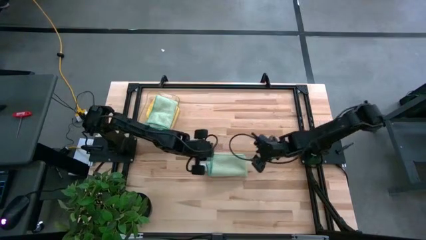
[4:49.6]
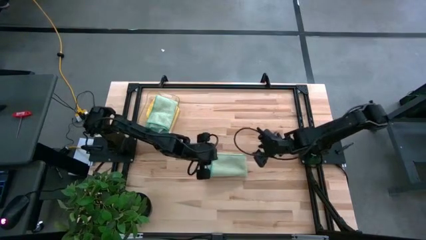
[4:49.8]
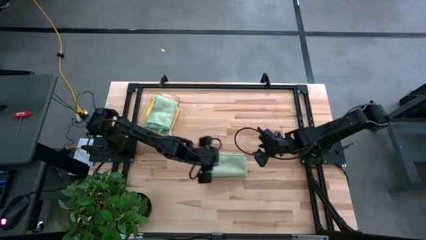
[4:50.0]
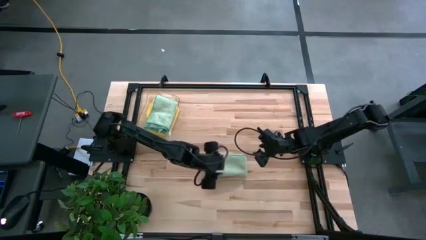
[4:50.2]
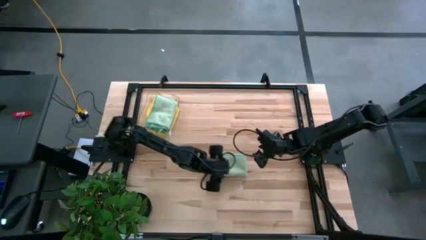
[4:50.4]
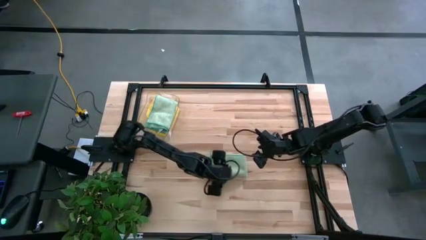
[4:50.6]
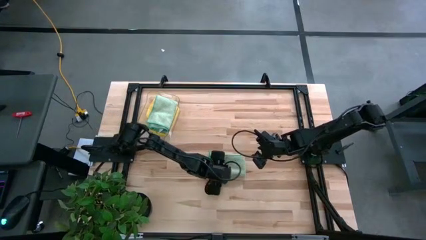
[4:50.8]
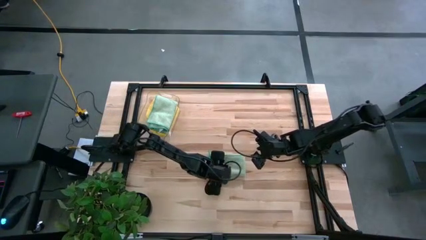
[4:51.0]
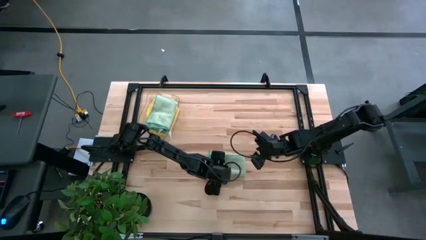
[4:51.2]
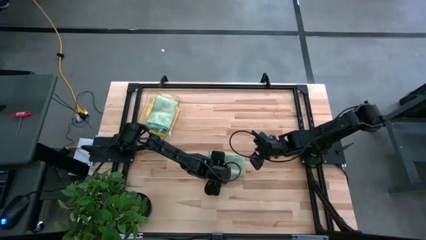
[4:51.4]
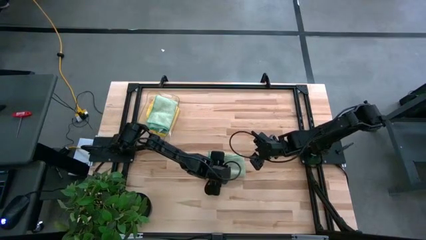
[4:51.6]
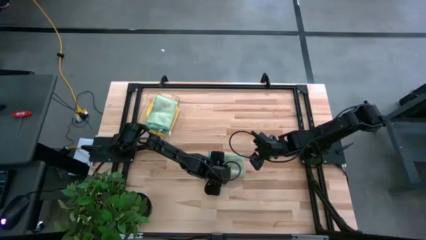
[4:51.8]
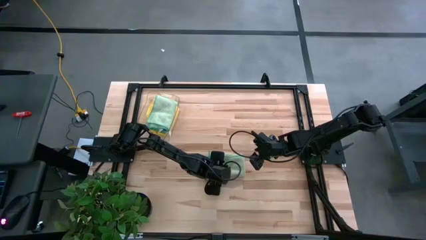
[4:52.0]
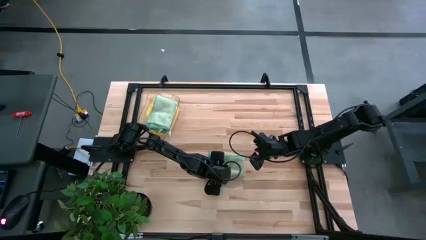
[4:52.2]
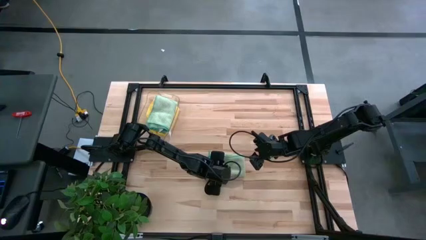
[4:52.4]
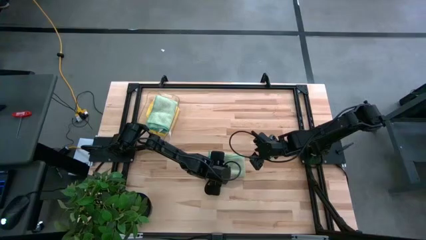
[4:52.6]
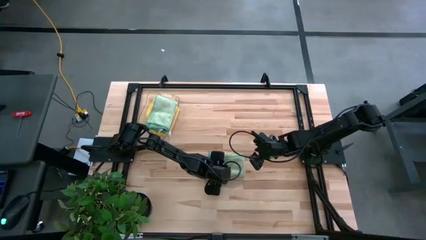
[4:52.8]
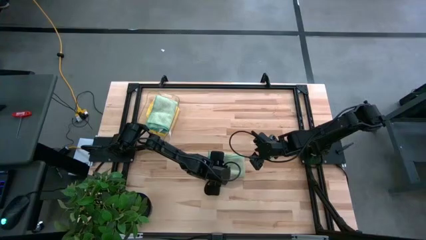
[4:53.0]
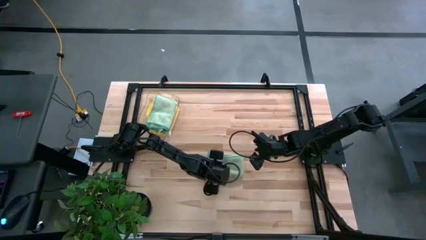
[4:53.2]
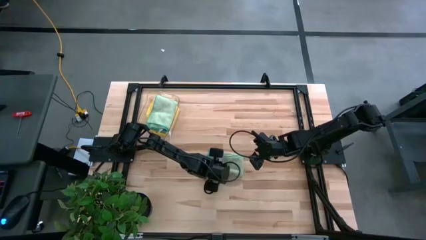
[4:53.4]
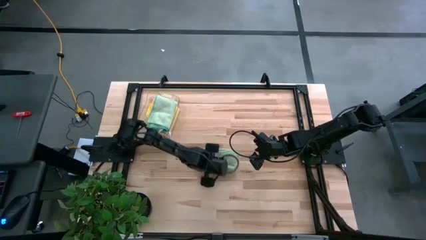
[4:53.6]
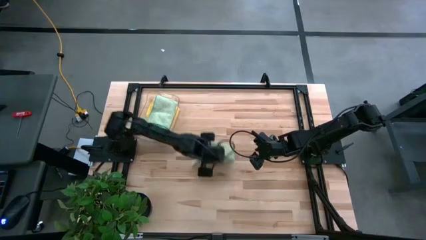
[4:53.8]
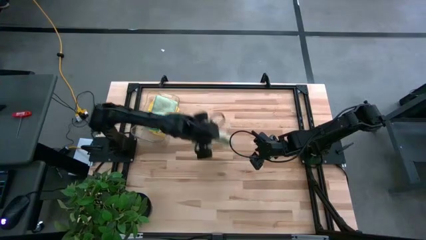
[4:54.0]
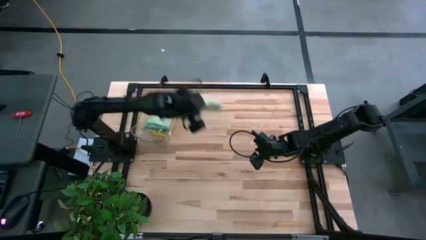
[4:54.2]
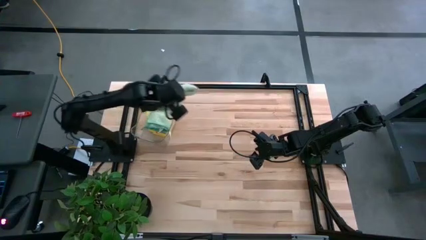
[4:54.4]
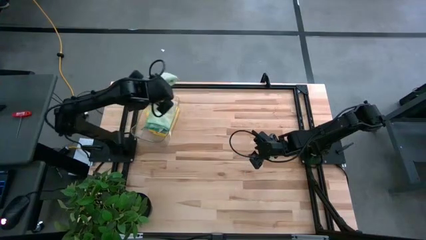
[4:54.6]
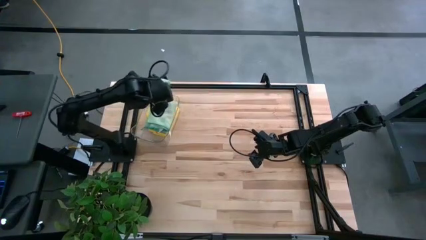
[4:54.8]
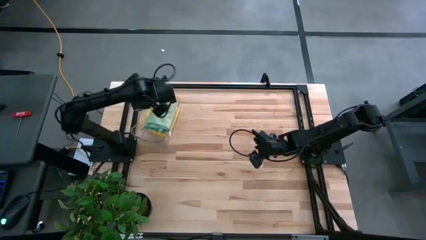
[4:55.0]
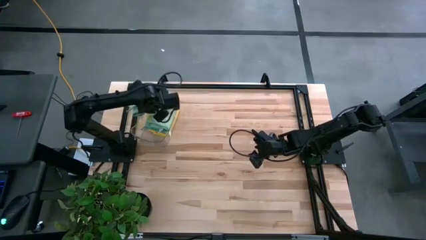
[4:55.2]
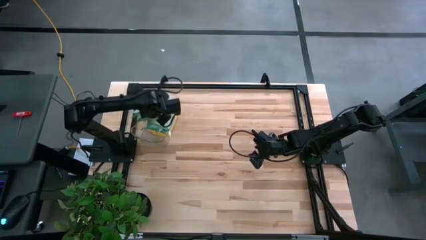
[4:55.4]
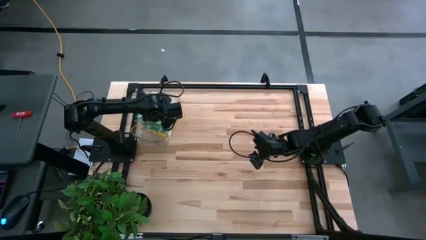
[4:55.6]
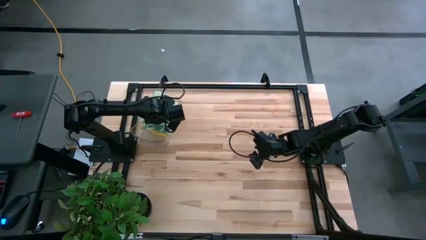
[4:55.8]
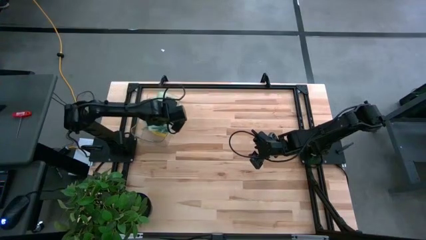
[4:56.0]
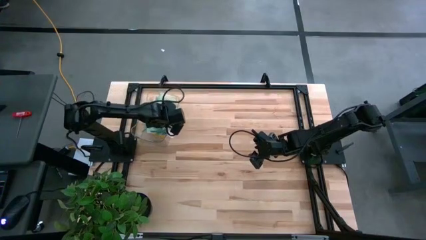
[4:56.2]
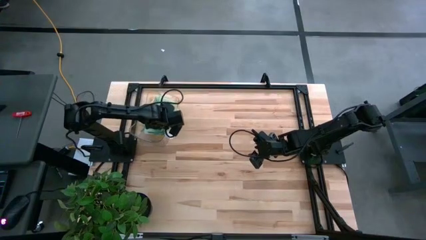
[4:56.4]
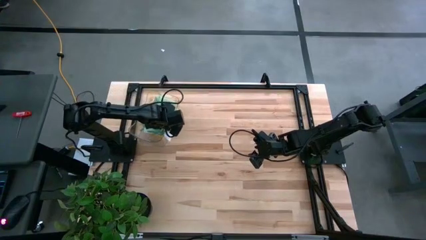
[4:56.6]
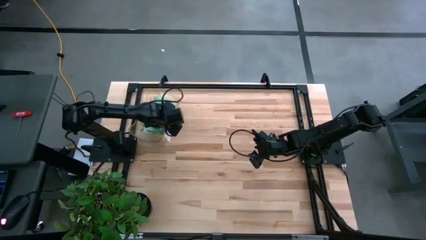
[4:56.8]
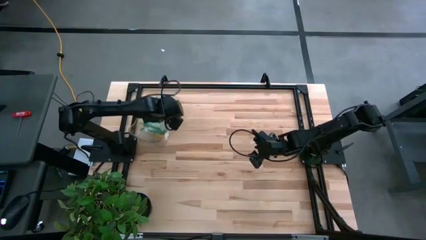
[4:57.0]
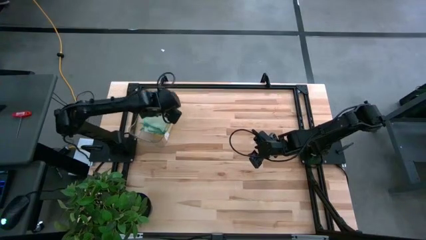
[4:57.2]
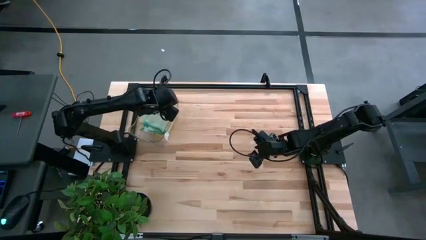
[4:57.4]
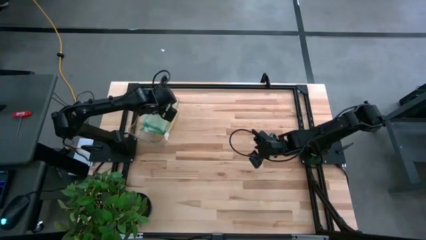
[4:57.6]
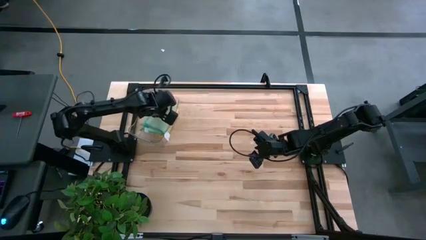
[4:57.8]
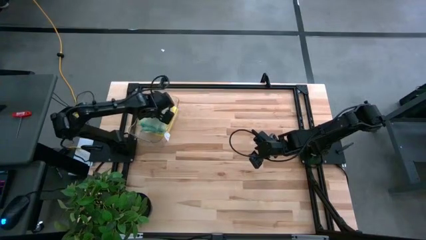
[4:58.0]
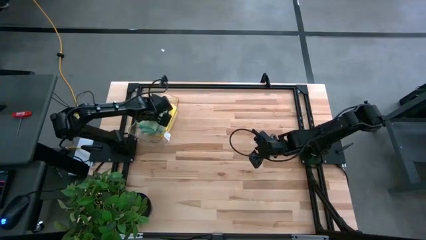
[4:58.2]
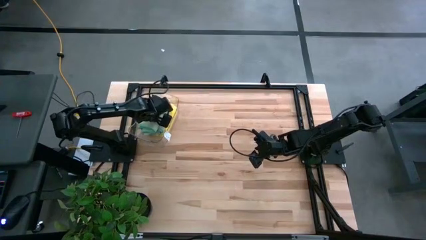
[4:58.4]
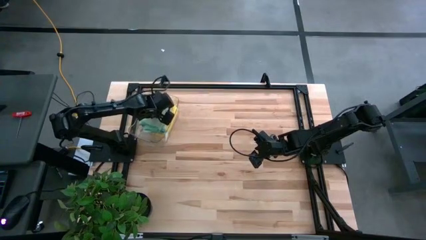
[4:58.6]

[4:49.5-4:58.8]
Task: Fold microfiber towels
Put the folded green towel into the transparent bin
